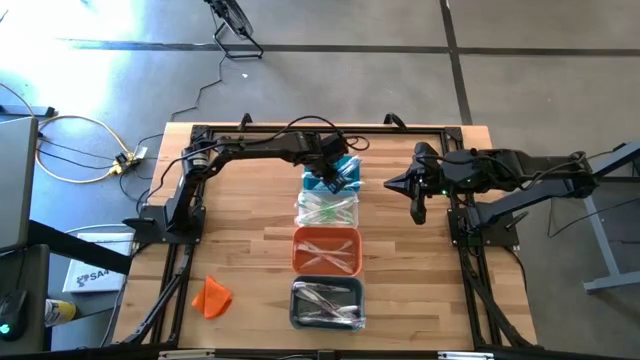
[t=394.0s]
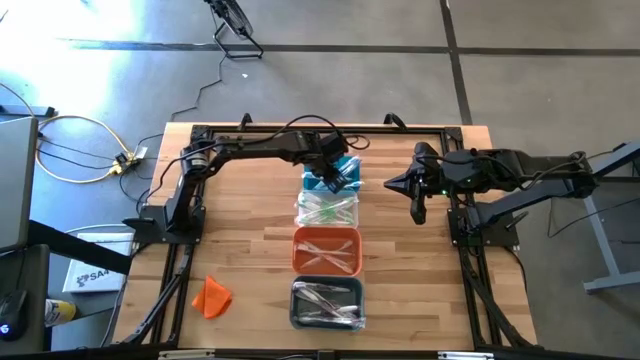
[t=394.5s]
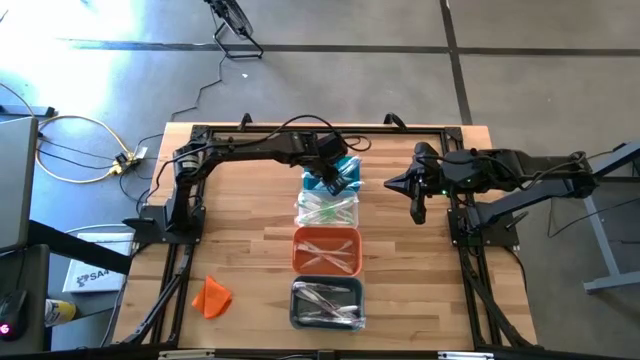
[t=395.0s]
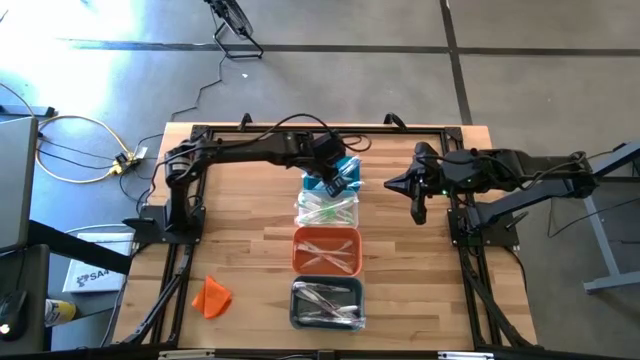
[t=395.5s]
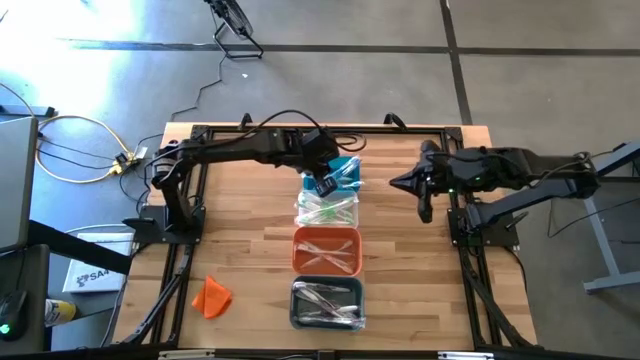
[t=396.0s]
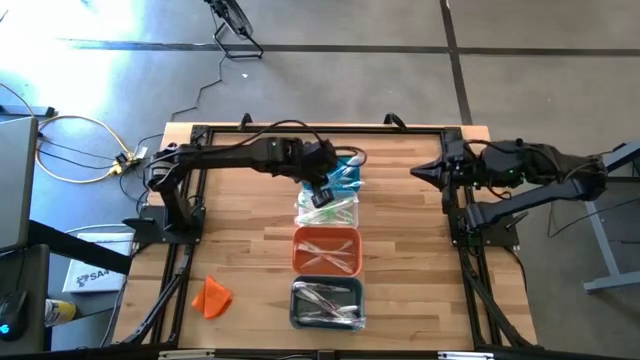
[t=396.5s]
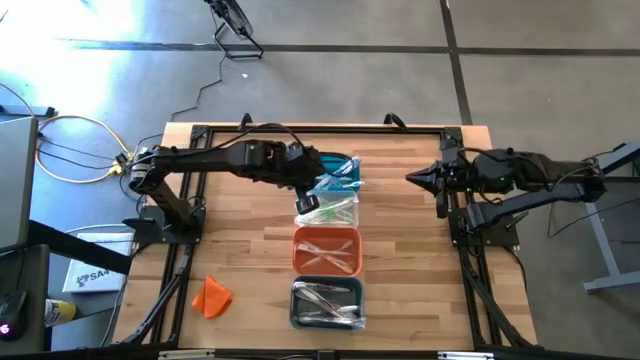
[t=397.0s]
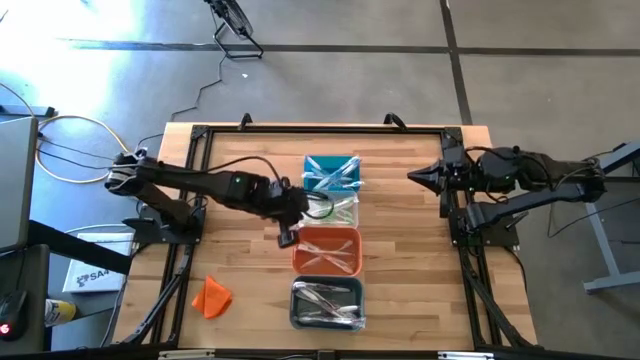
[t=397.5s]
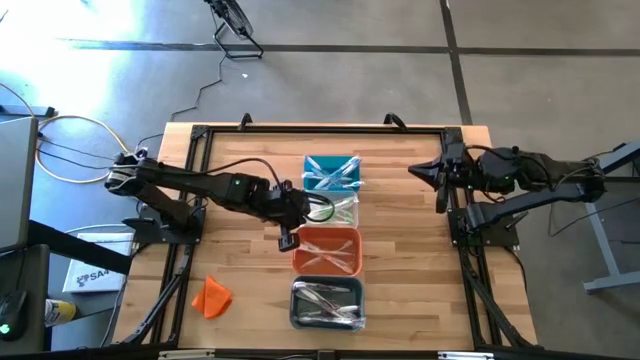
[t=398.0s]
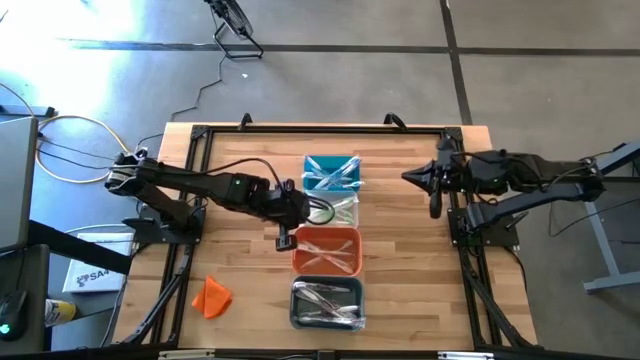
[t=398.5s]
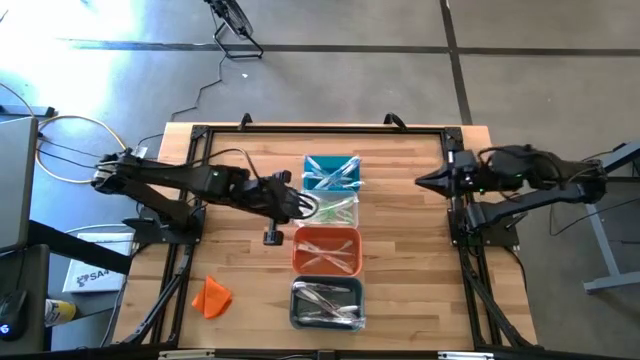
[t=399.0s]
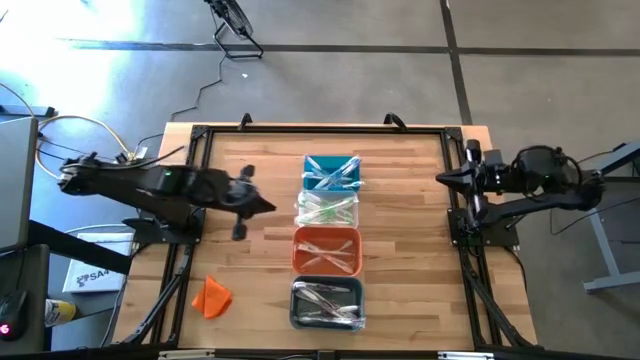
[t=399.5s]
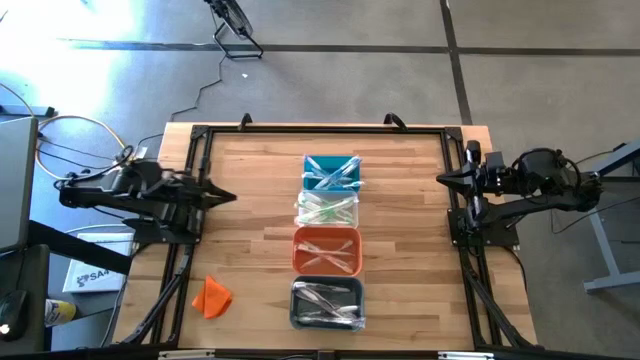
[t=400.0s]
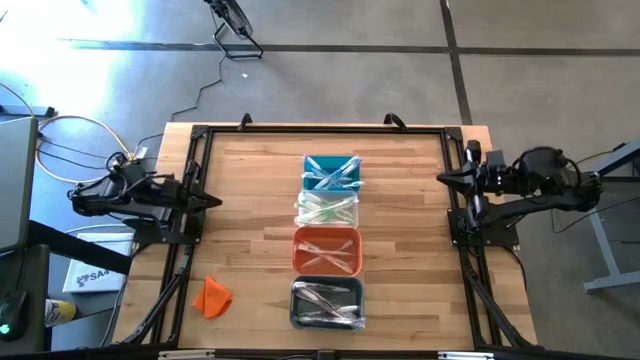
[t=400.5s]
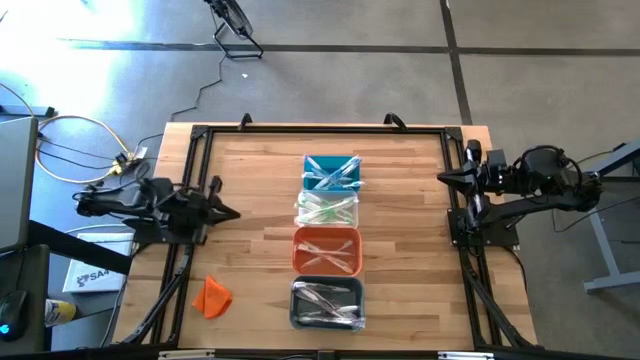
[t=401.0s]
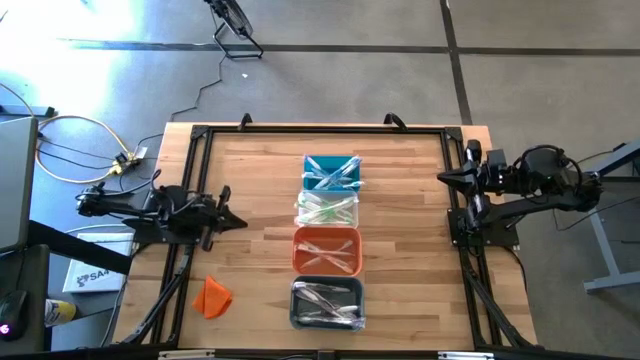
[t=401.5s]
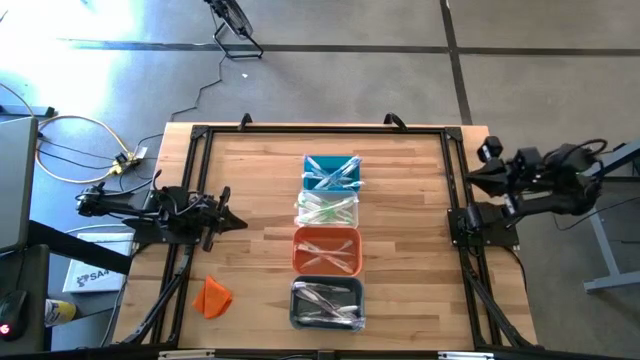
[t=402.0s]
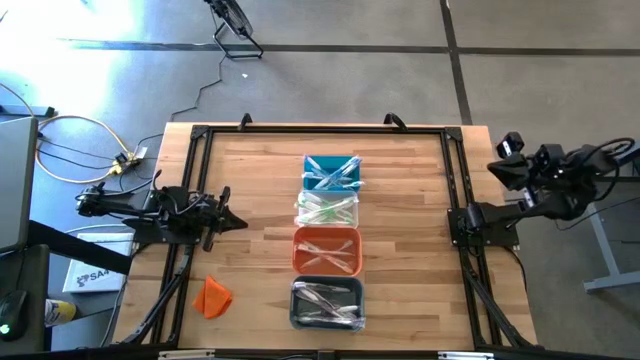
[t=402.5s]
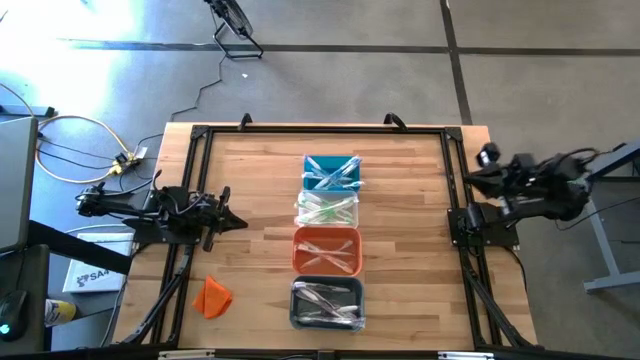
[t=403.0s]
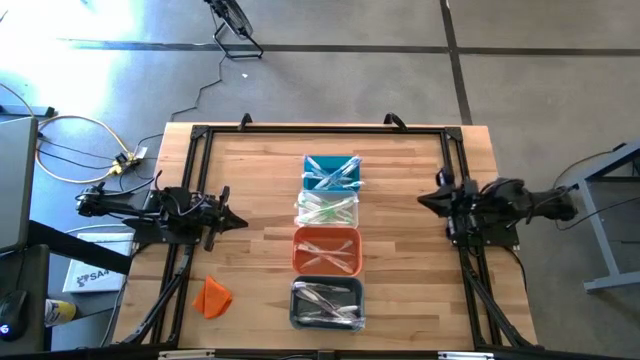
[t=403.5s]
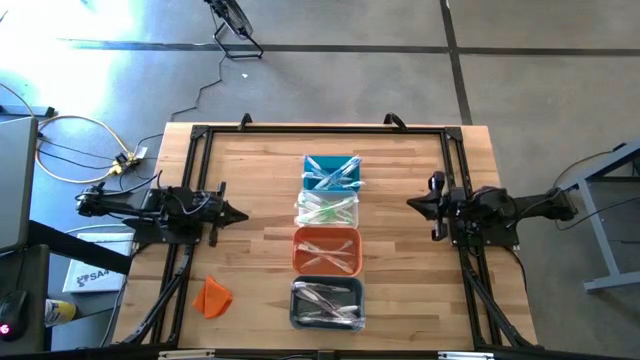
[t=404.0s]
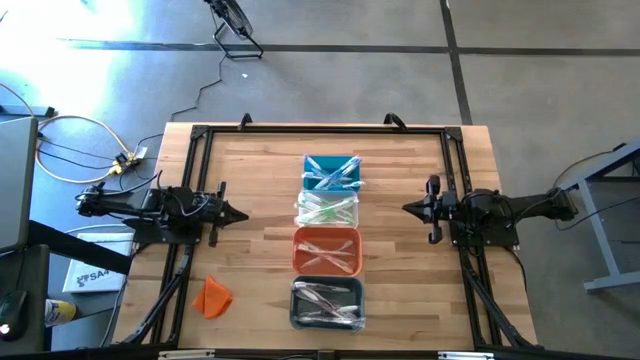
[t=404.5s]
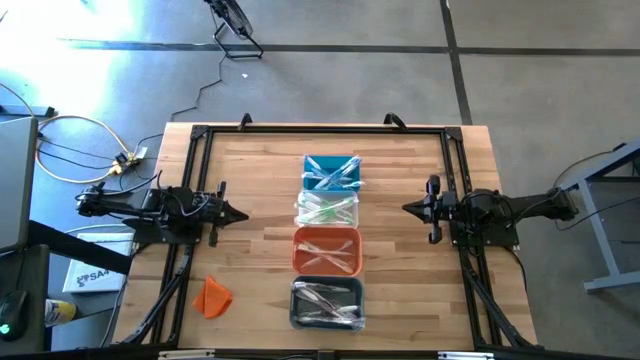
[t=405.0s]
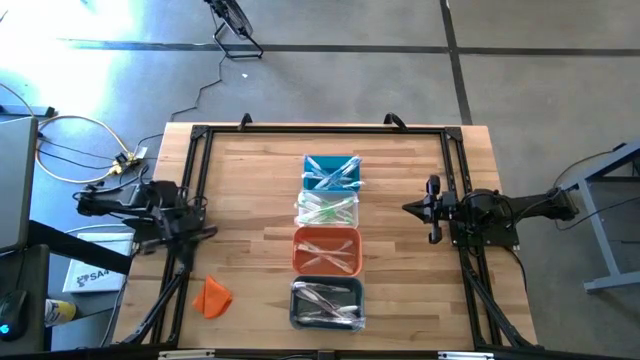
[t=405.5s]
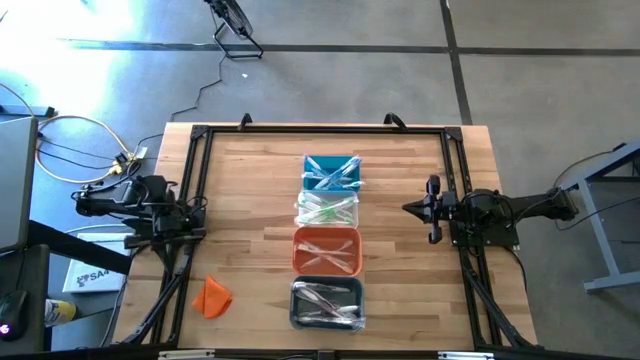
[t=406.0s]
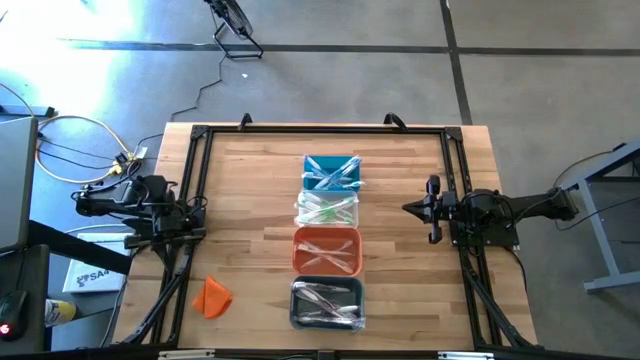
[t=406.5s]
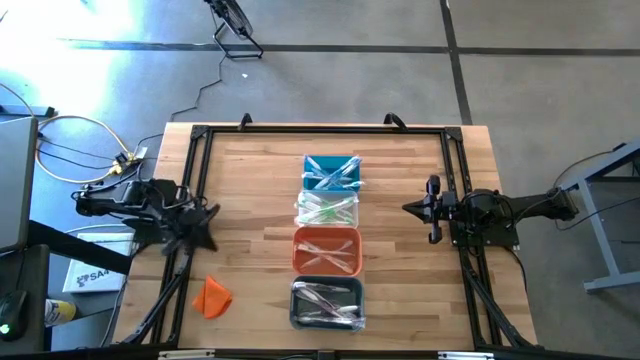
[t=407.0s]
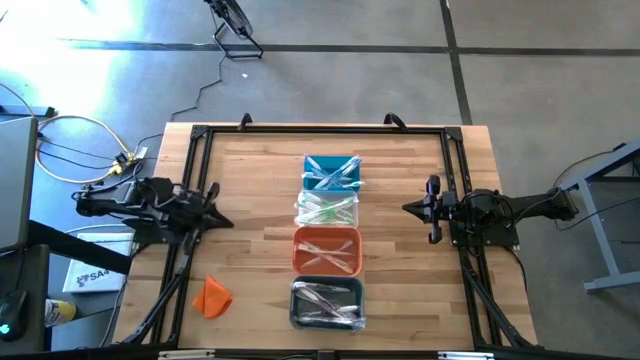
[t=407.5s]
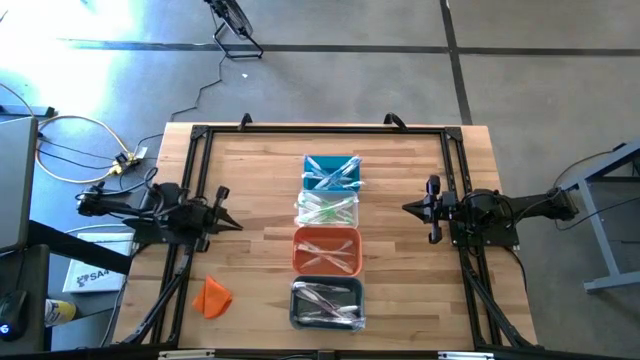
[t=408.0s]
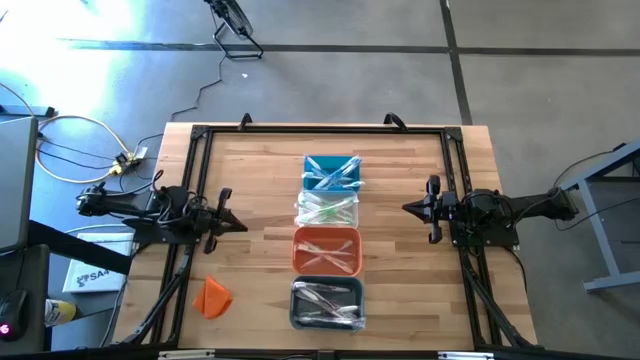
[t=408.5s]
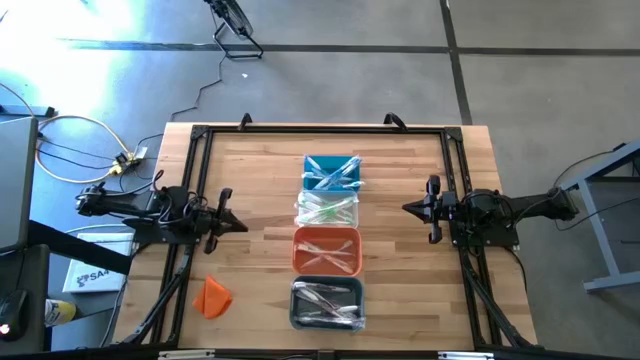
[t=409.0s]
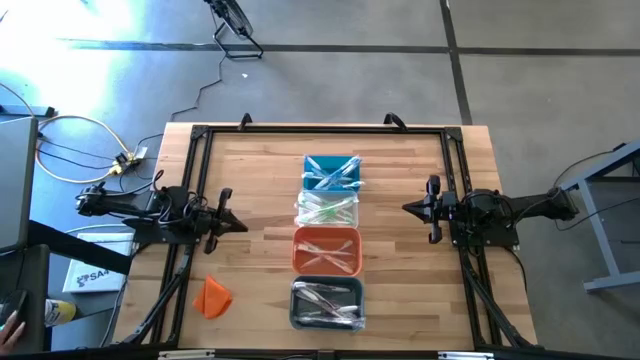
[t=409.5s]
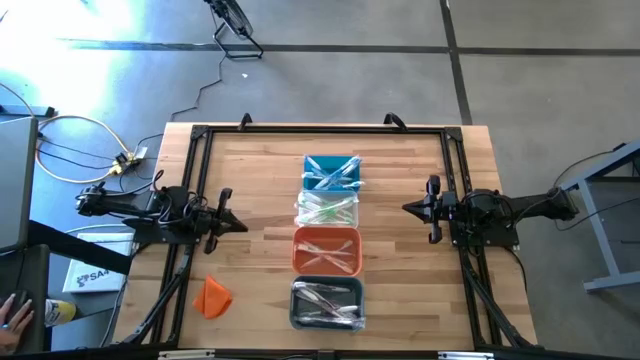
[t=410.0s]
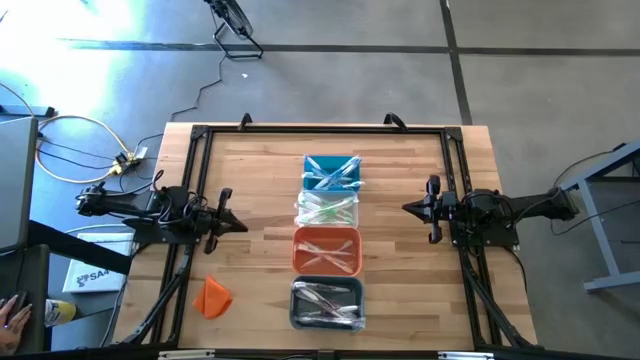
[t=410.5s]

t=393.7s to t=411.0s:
Task: Pick & Place Toothbrushes
Return to home position

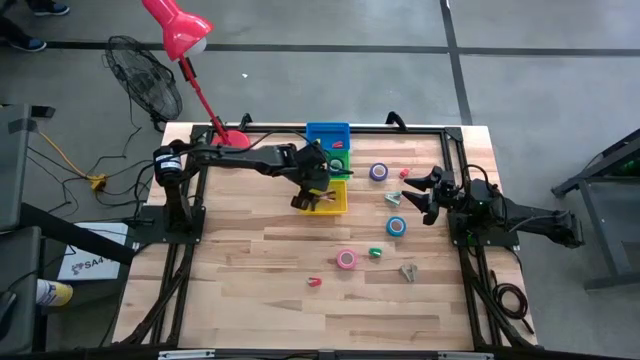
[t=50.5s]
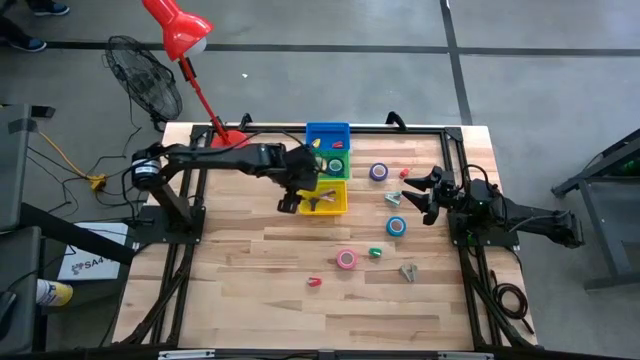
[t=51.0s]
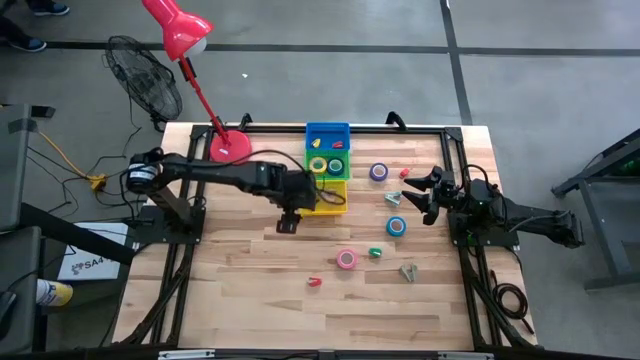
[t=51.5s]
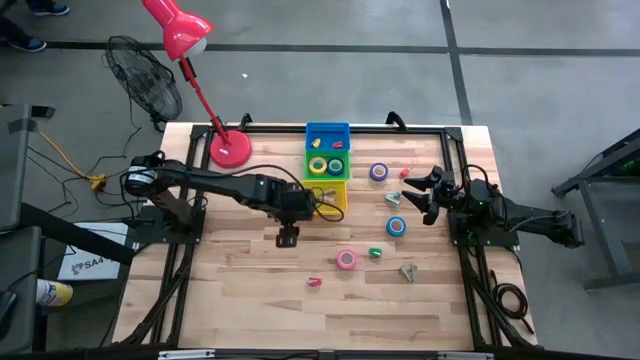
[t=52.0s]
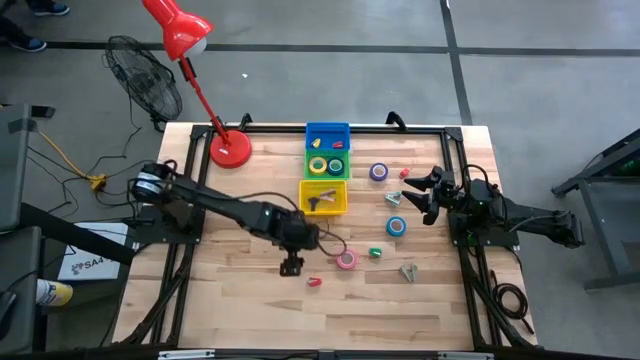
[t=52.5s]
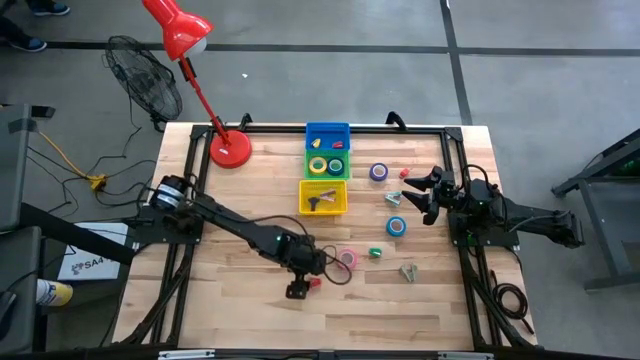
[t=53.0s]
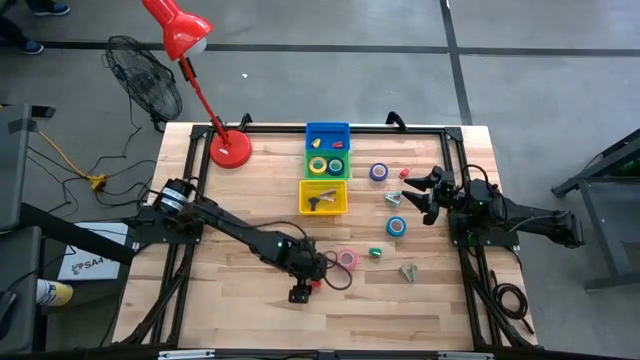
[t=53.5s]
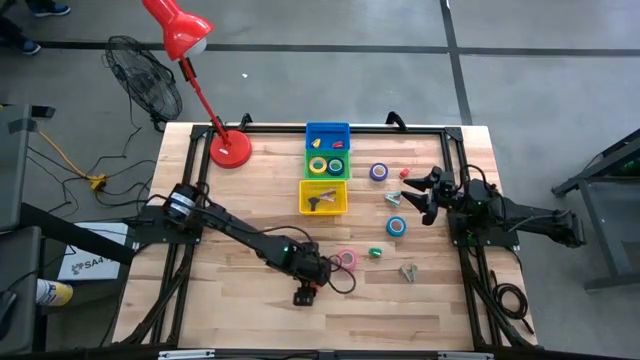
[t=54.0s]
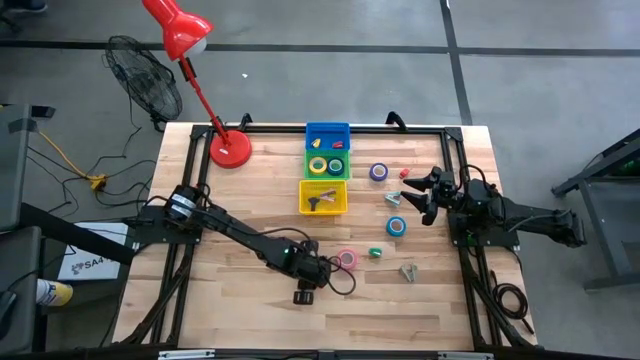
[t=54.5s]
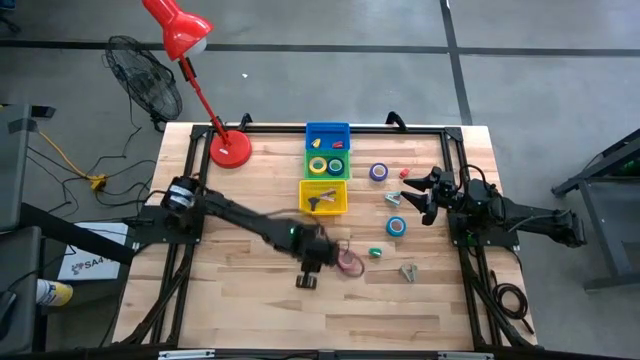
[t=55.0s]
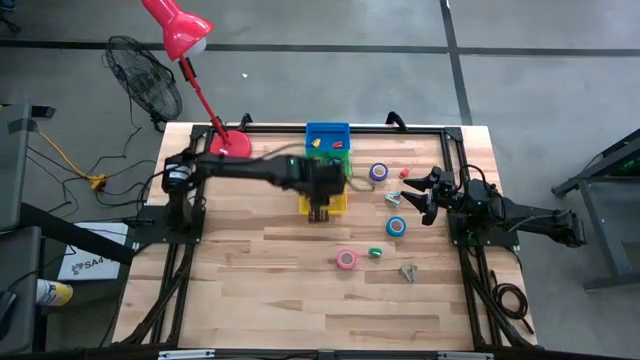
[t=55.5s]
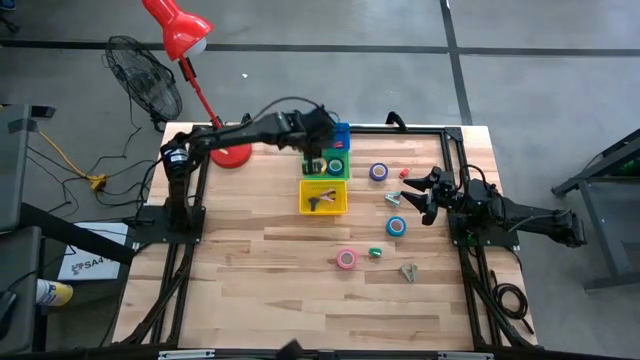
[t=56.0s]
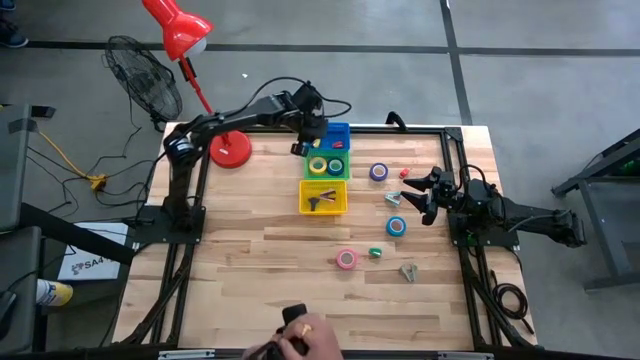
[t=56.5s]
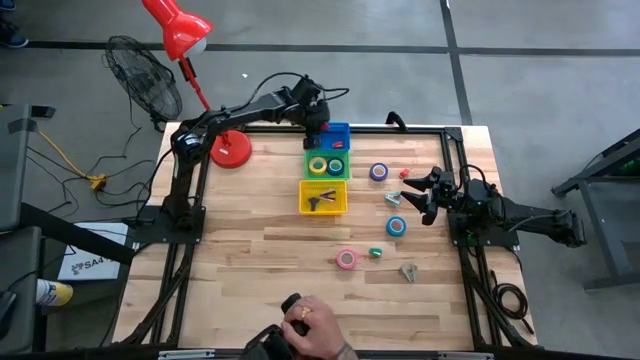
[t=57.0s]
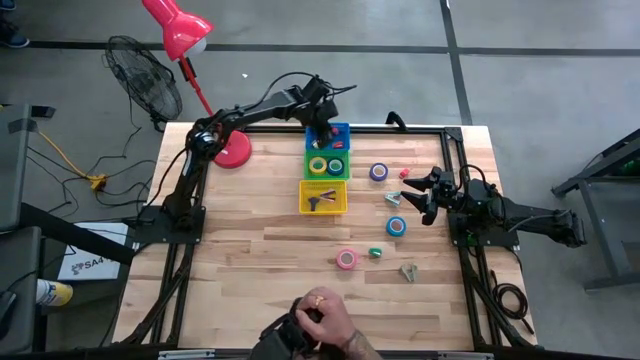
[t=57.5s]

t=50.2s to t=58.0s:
Task: Pick and place Stapler, Stapler remover, tape
Put the bottom red stapler into the blue bin
